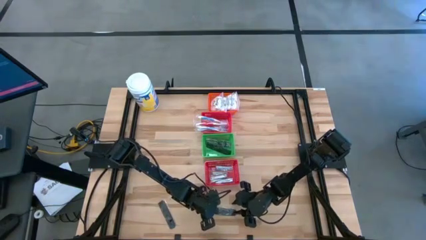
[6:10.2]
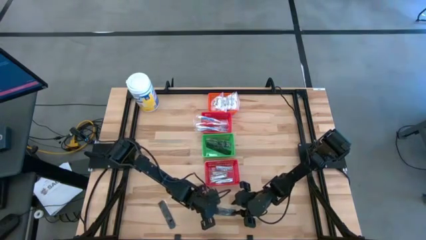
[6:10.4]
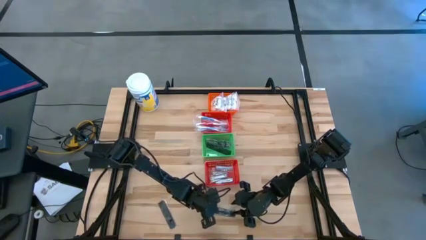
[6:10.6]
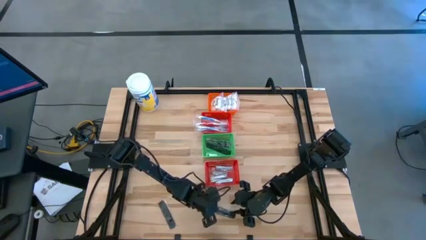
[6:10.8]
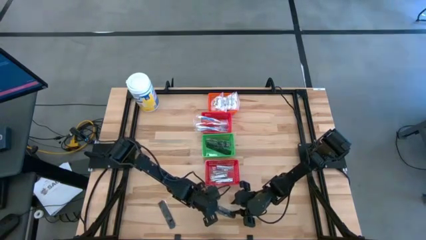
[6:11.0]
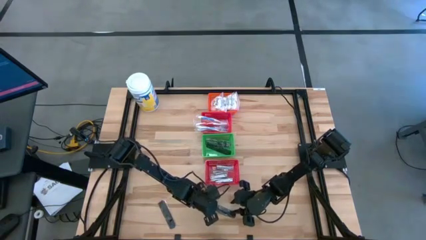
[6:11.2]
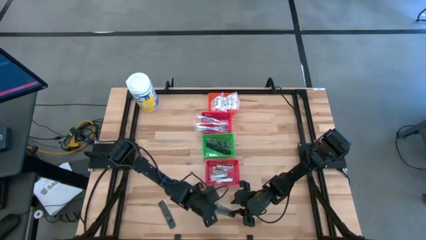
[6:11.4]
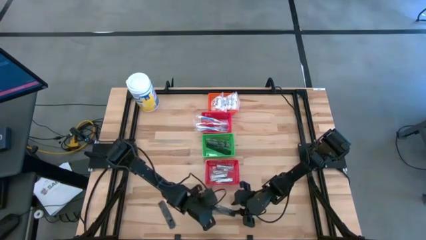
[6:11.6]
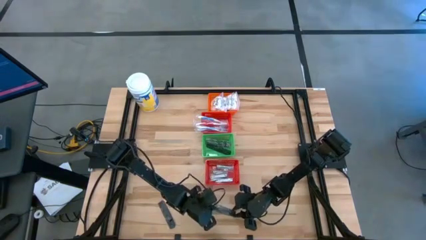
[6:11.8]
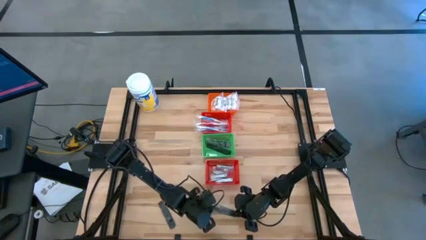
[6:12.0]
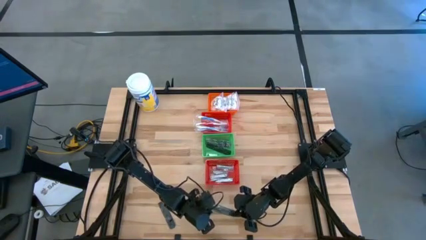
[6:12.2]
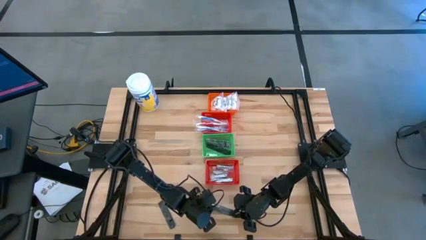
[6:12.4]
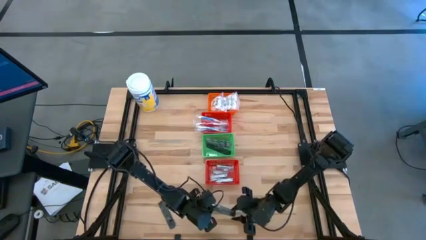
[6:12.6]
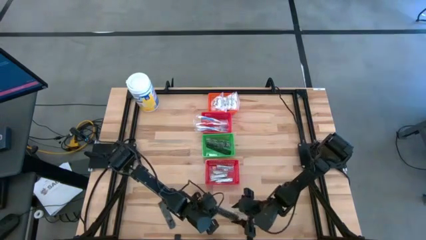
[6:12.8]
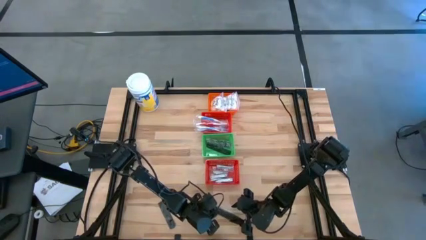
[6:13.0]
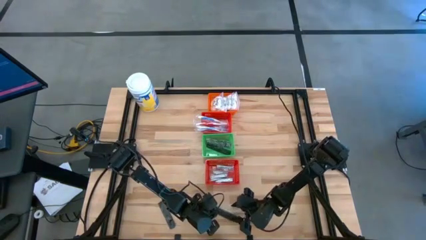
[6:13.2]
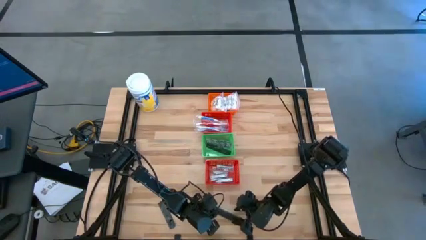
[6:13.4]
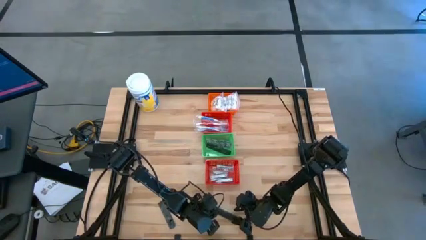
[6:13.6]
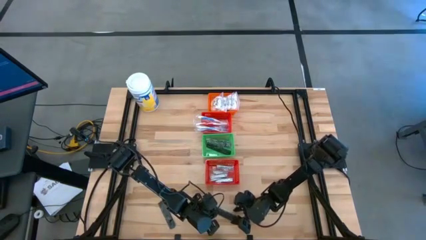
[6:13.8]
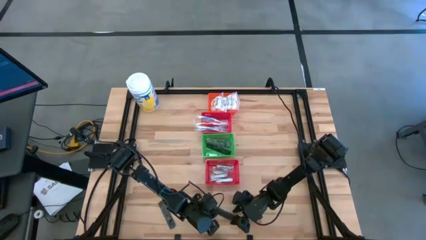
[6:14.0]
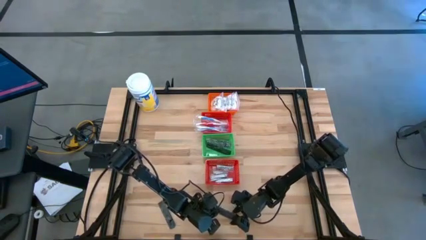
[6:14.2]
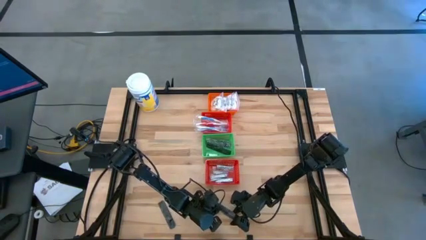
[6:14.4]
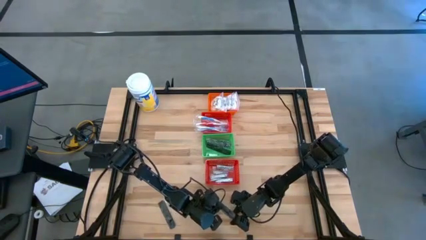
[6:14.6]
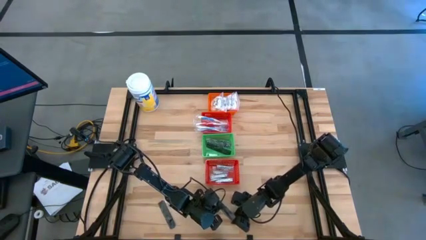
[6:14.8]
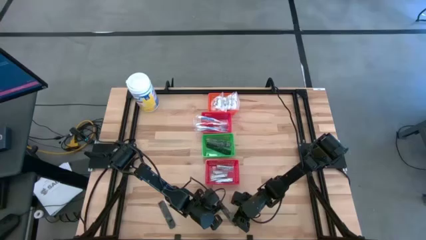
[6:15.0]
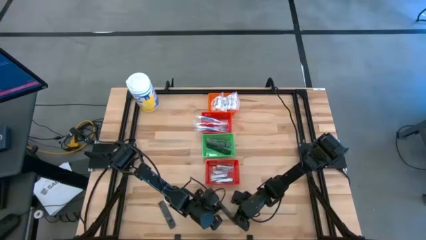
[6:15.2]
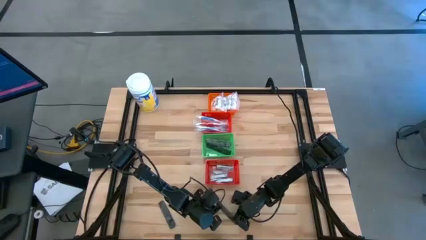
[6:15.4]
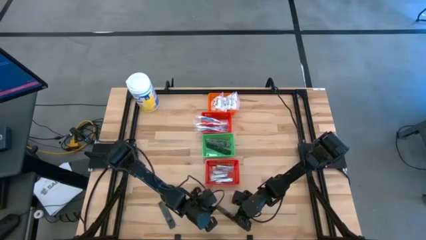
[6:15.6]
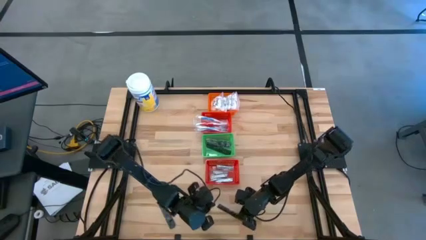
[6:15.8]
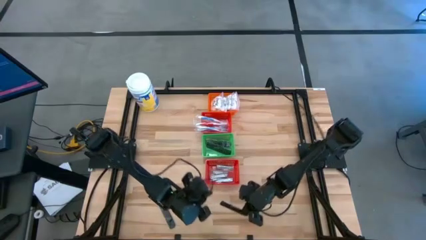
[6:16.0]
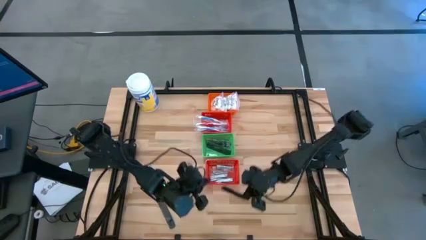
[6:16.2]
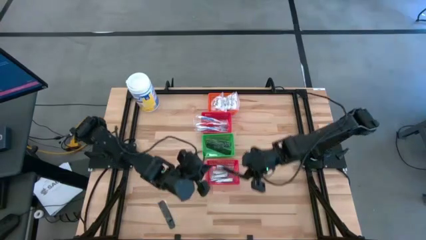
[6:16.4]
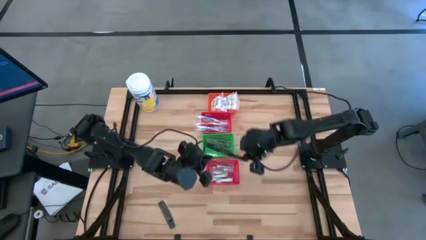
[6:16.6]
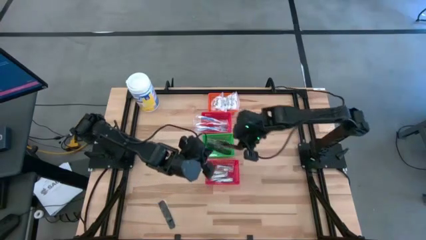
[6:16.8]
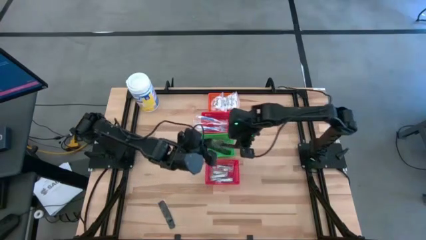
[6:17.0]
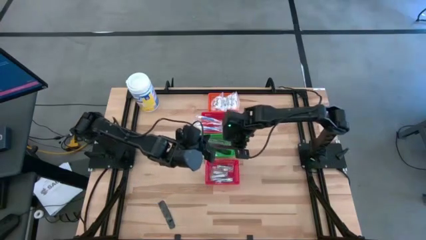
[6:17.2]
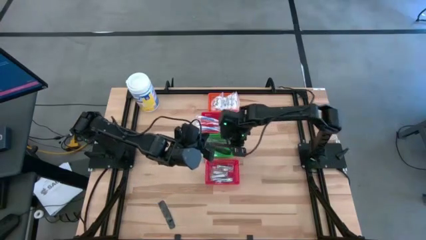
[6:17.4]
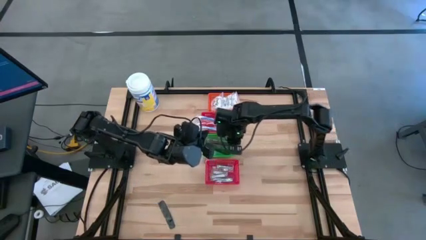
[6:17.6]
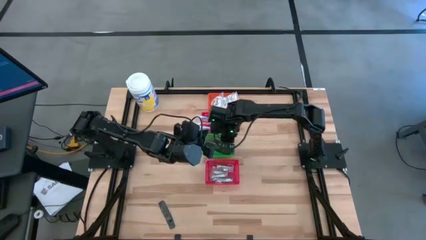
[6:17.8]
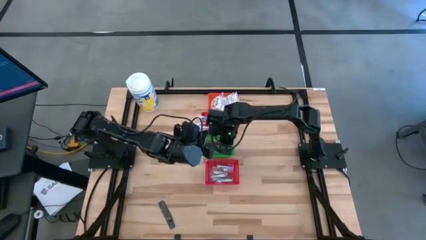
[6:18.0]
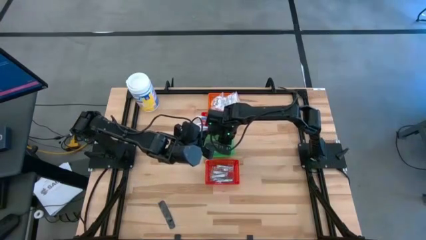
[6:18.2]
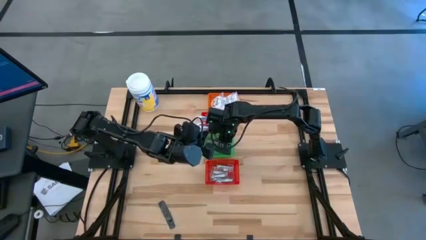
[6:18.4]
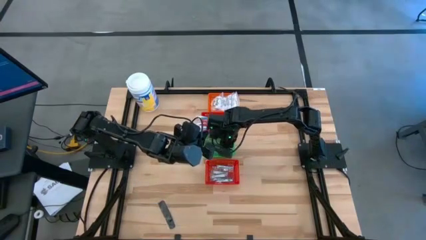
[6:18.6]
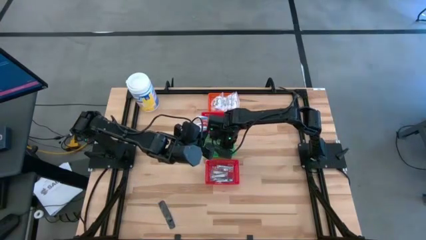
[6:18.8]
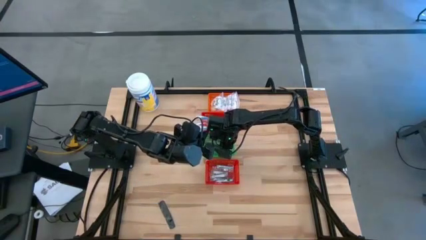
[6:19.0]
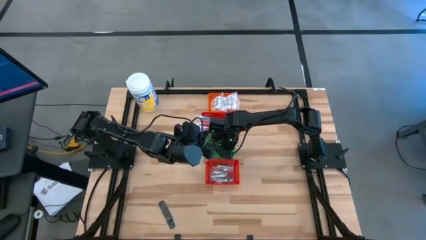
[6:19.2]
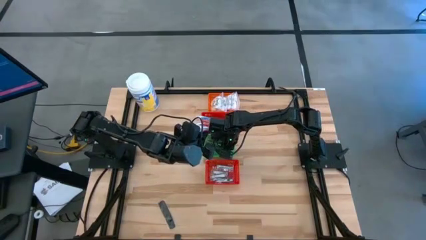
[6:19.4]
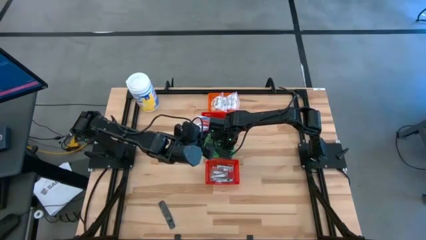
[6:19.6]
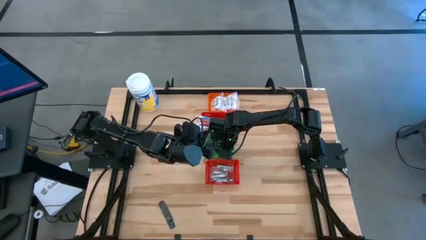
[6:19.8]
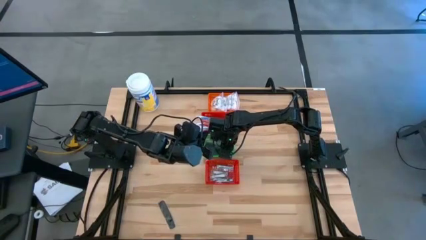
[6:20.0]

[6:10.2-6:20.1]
Task: Pick & Place Travel size toiletries
Put the black comb into the green basket

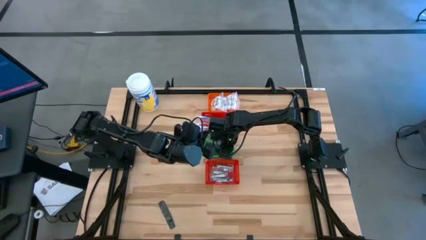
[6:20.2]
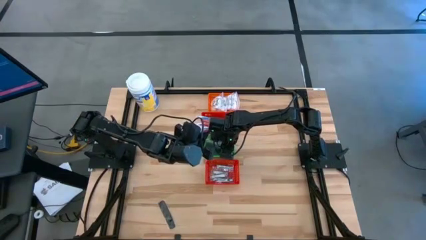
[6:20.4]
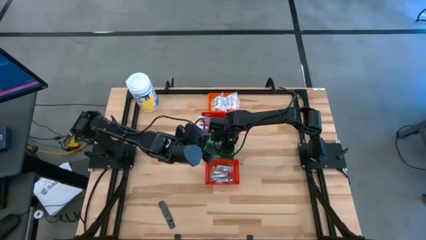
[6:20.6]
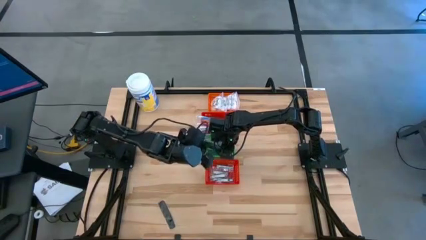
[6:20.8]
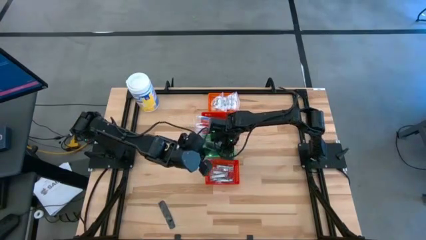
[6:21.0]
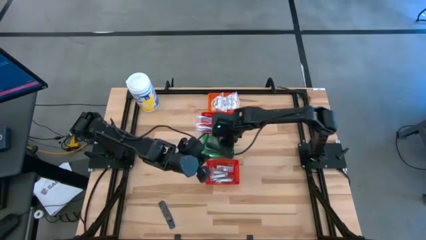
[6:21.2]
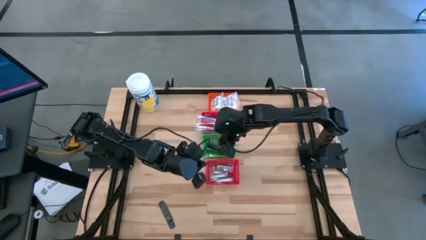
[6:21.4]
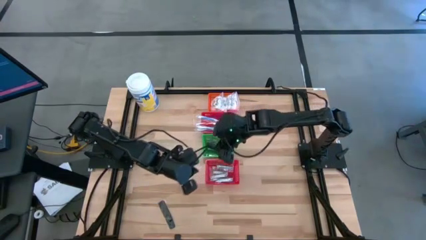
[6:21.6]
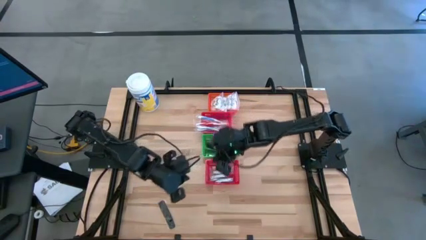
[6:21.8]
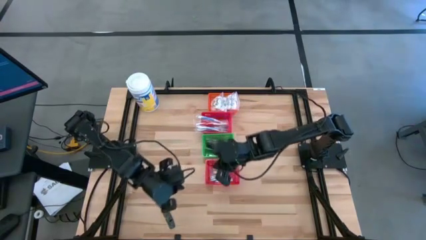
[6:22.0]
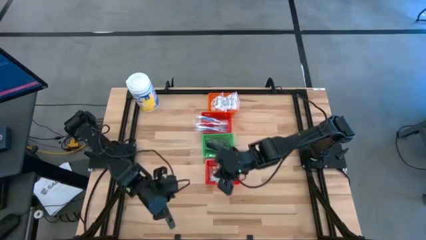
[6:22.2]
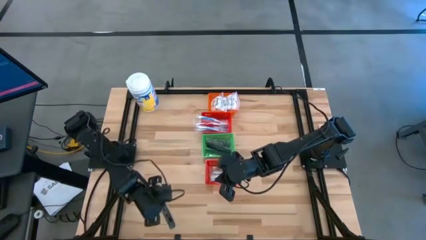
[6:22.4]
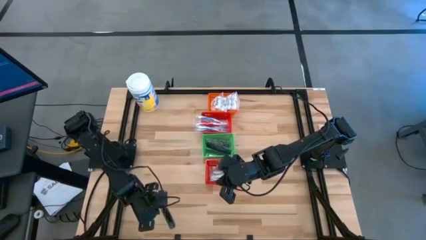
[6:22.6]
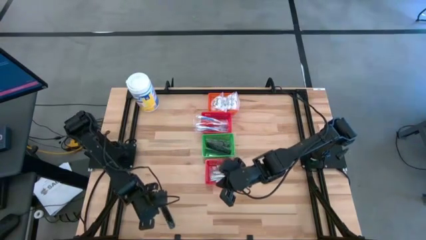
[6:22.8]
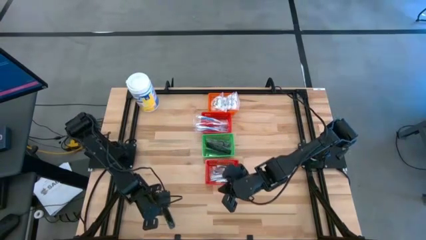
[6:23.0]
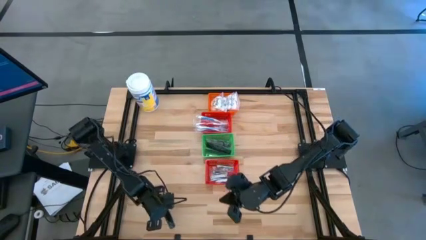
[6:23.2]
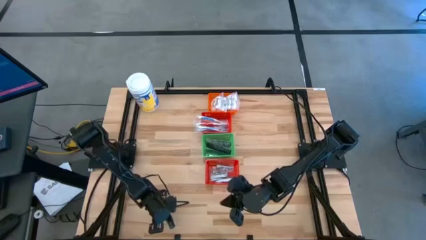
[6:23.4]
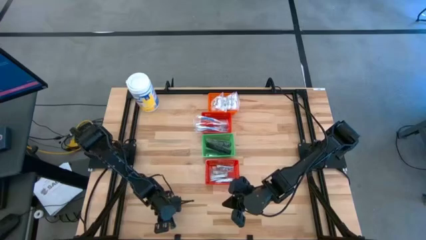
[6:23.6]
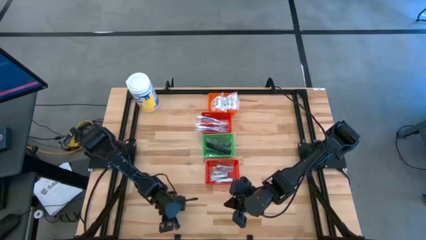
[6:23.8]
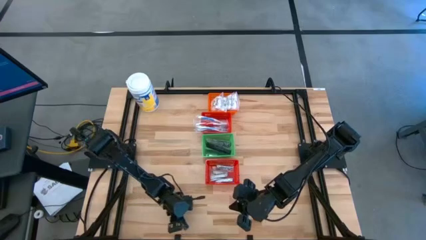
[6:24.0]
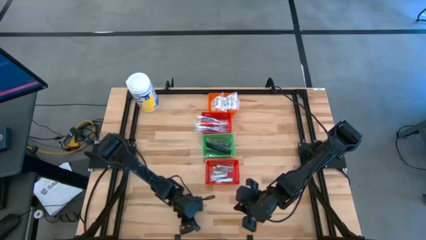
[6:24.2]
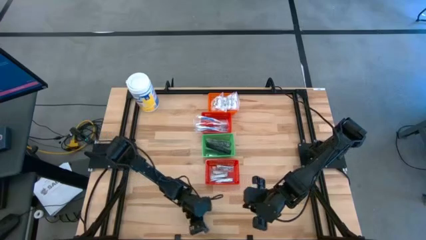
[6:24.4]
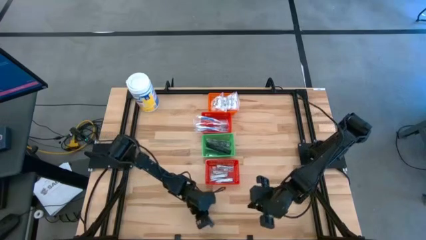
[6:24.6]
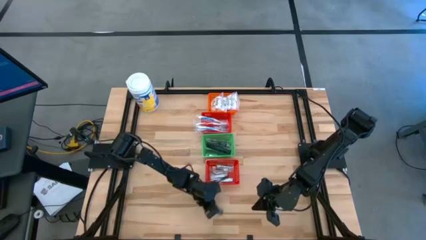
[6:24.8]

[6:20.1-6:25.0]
Move the black comb to the bottom center of the table

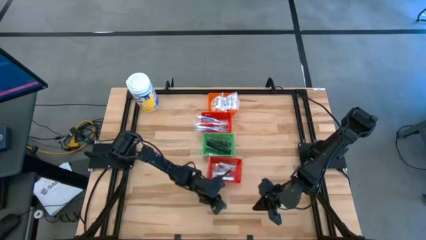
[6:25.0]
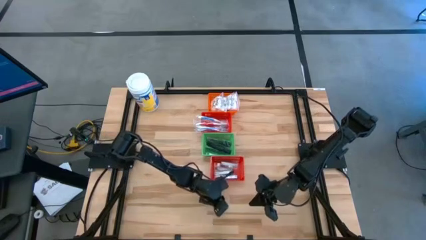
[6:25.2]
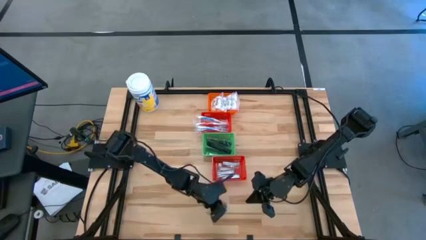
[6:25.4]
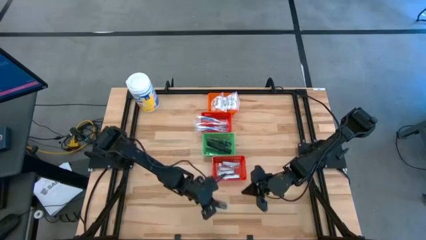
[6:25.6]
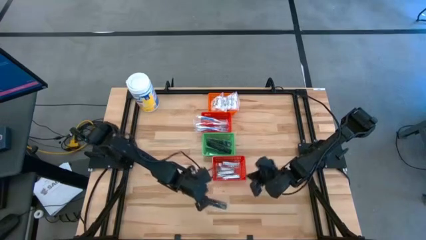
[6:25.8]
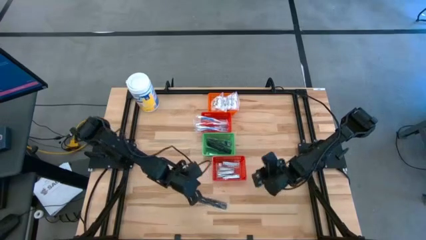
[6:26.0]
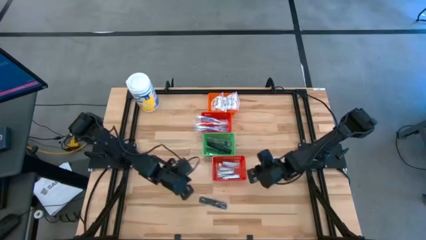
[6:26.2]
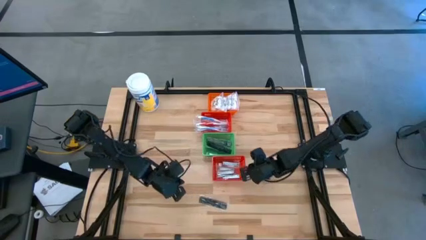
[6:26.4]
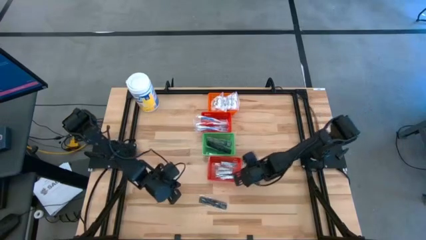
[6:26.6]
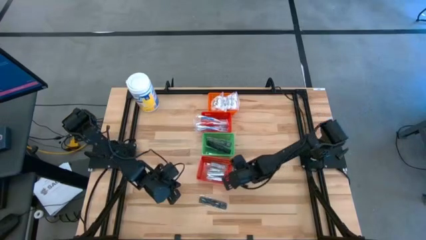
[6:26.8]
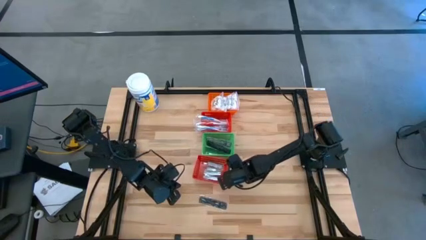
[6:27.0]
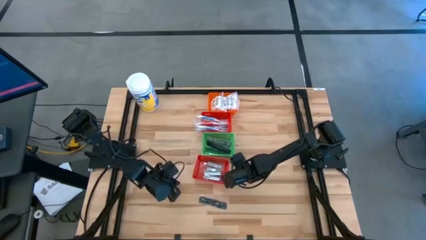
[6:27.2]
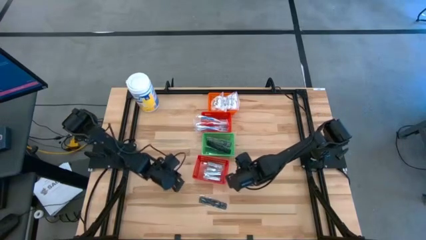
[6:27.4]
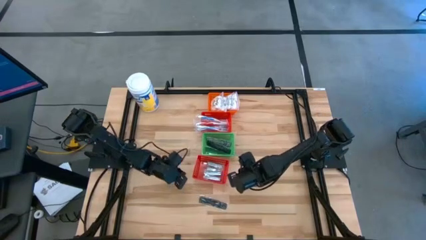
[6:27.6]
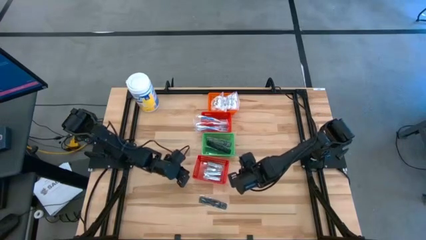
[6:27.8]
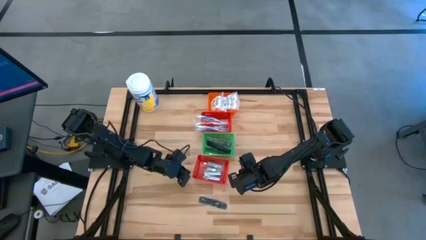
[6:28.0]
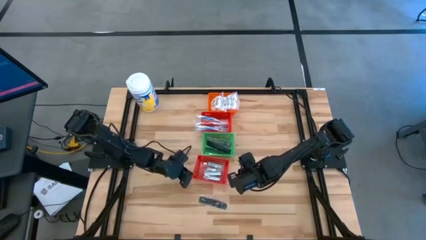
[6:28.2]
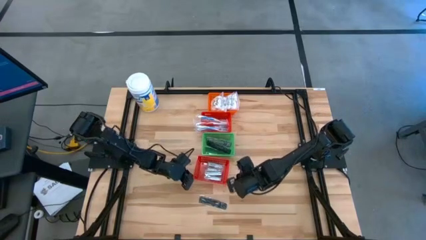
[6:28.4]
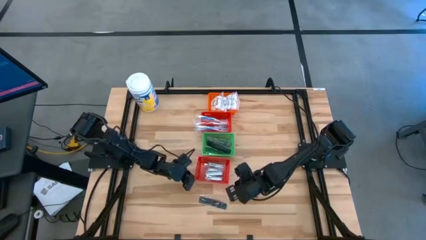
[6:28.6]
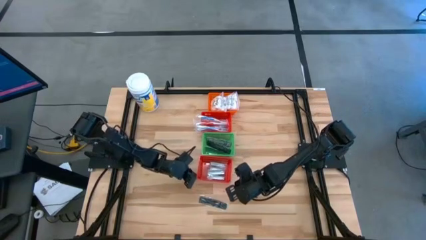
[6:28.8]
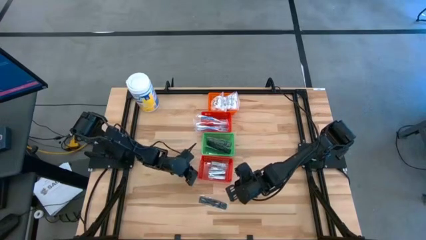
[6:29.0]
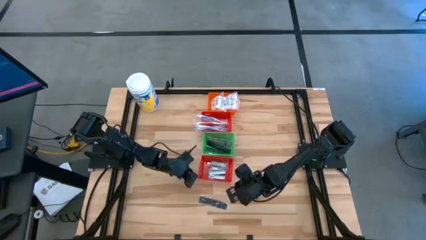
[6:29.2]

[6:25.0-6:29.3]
Adjust the bottom red basket
